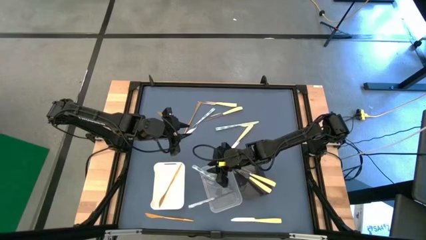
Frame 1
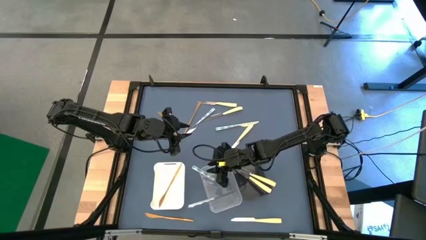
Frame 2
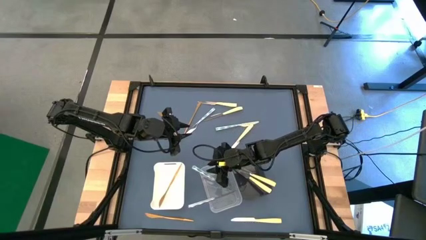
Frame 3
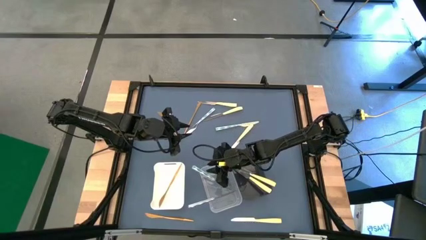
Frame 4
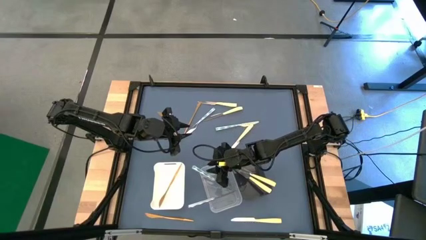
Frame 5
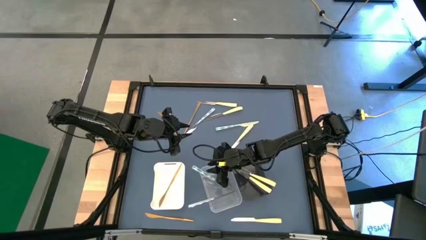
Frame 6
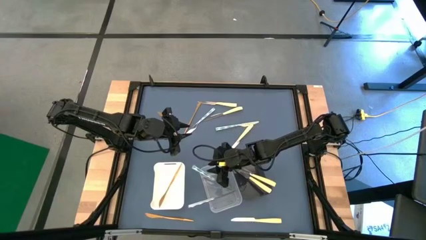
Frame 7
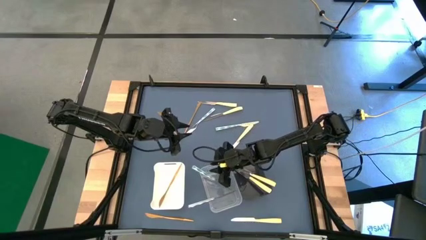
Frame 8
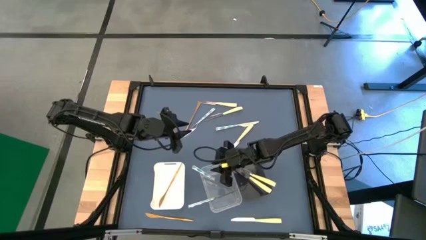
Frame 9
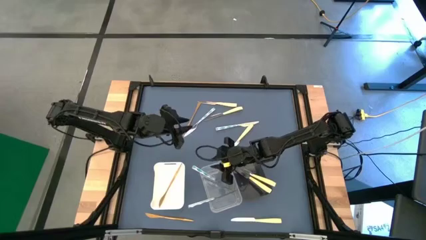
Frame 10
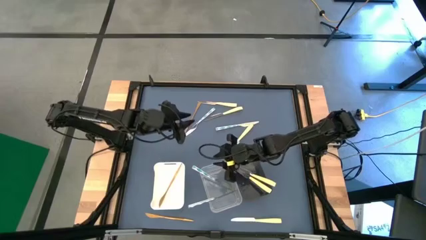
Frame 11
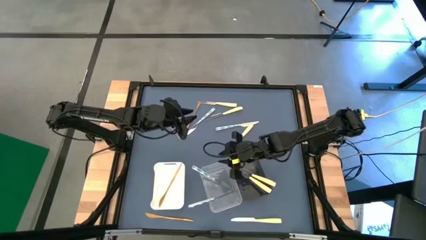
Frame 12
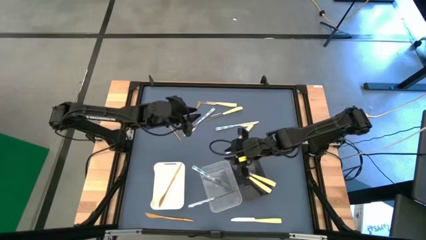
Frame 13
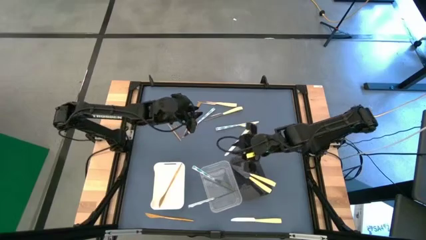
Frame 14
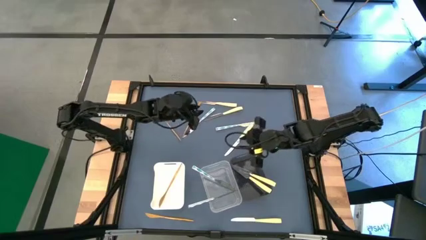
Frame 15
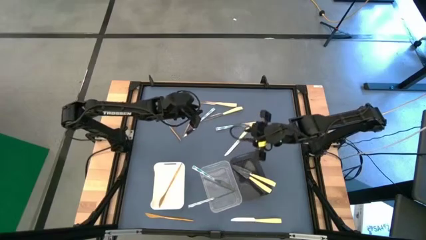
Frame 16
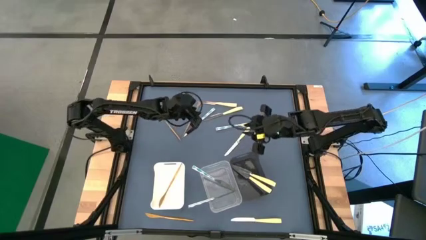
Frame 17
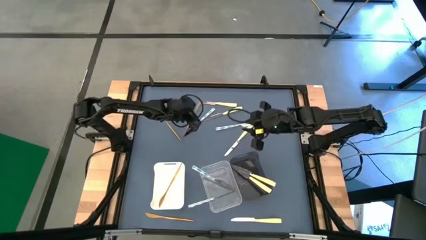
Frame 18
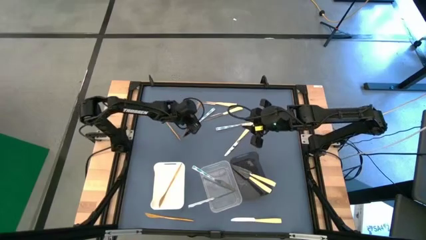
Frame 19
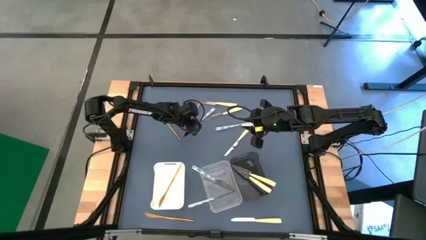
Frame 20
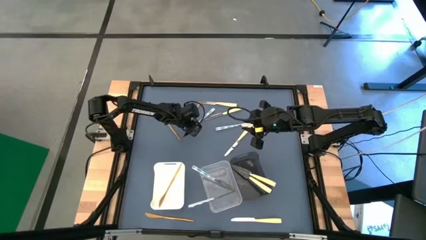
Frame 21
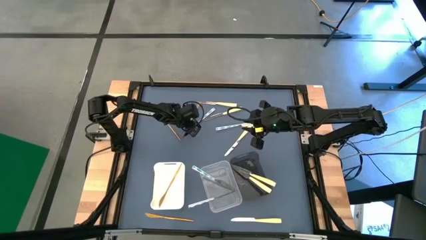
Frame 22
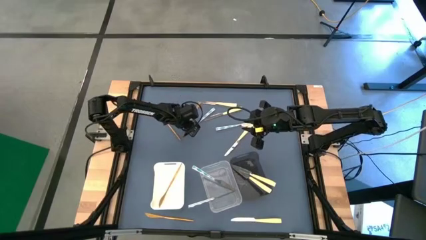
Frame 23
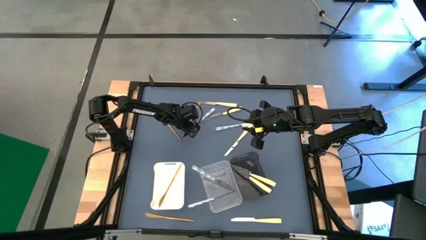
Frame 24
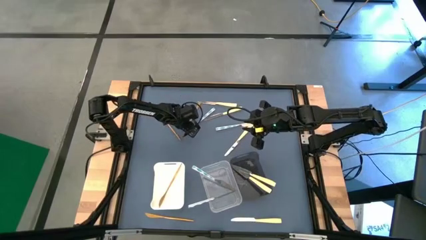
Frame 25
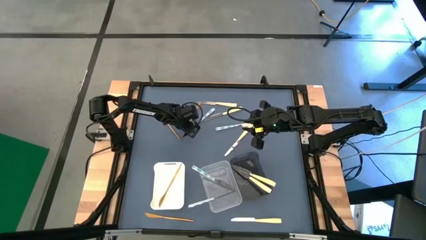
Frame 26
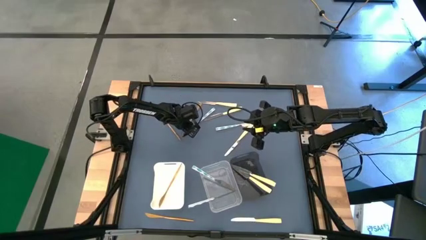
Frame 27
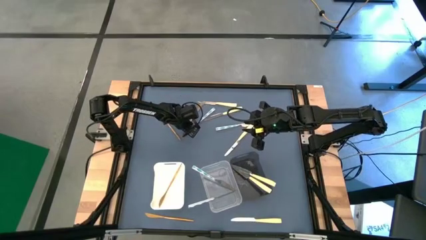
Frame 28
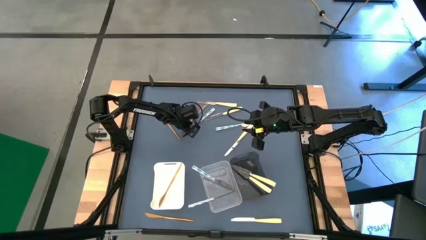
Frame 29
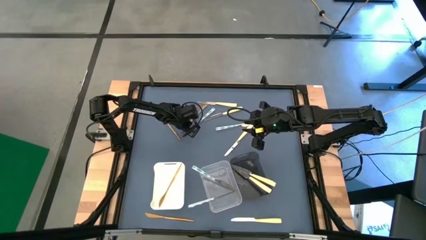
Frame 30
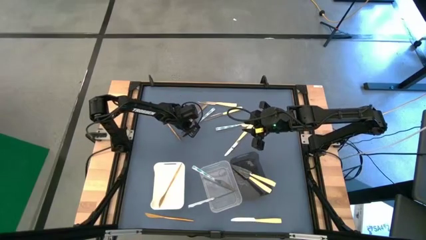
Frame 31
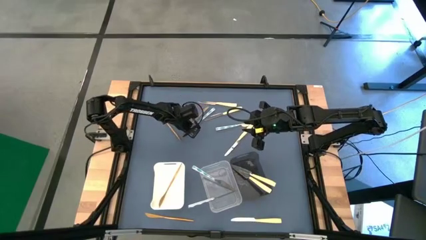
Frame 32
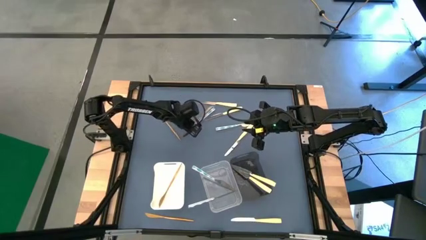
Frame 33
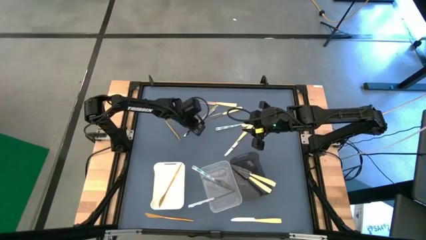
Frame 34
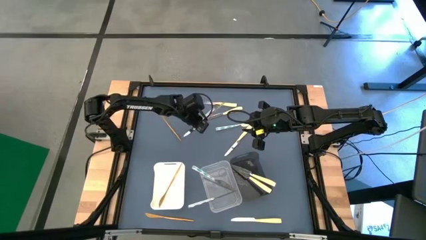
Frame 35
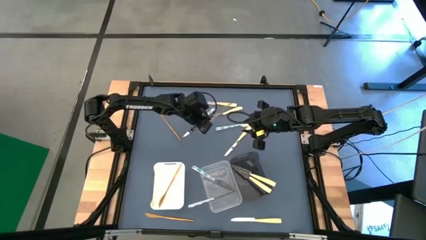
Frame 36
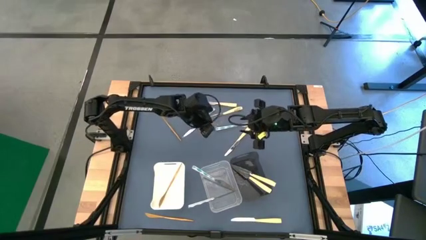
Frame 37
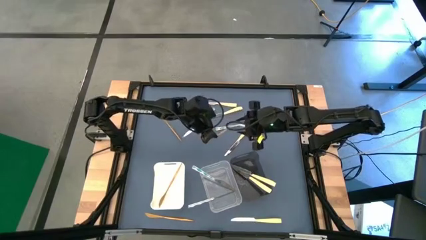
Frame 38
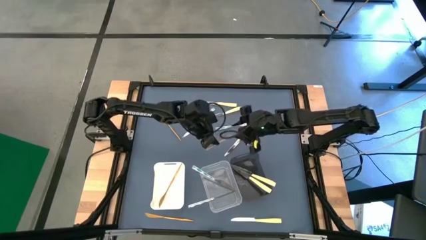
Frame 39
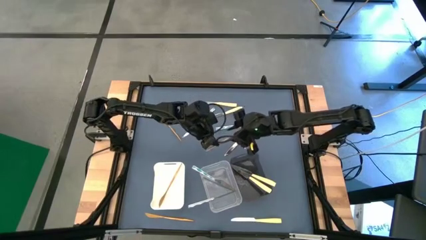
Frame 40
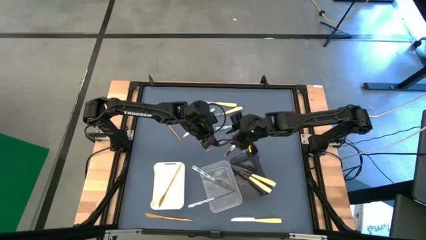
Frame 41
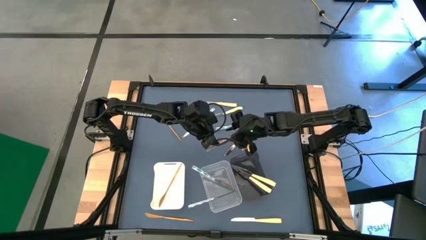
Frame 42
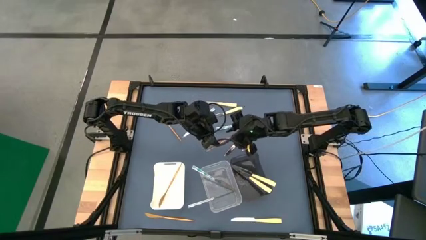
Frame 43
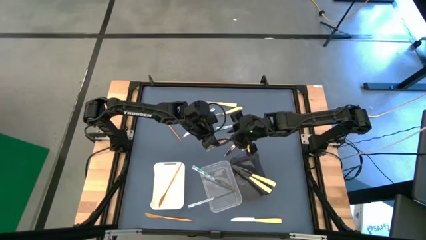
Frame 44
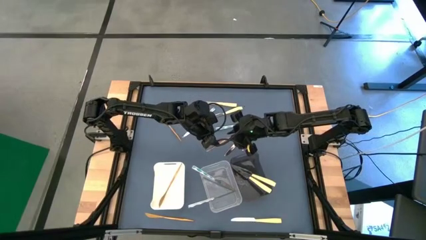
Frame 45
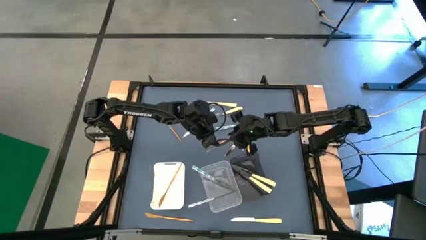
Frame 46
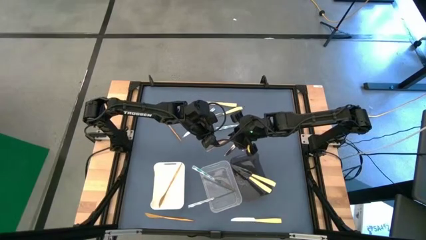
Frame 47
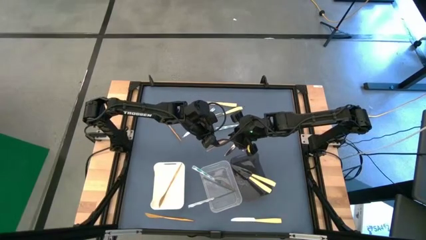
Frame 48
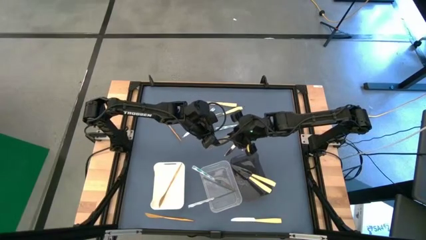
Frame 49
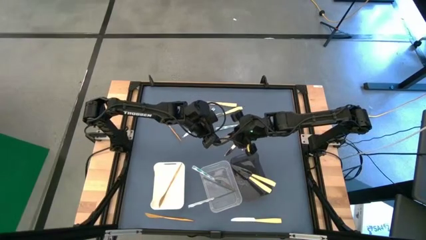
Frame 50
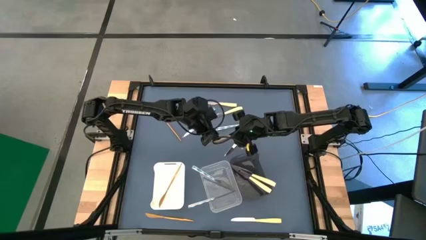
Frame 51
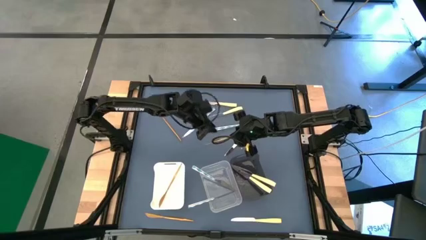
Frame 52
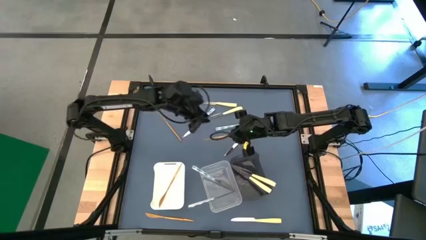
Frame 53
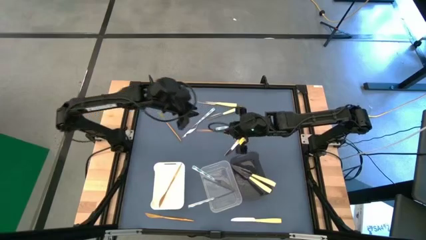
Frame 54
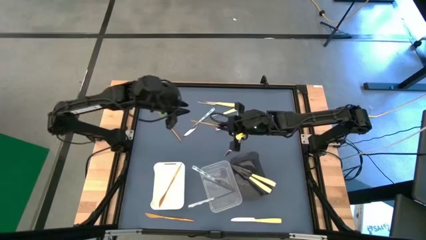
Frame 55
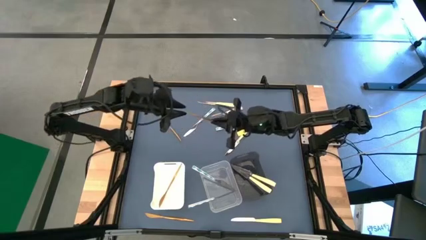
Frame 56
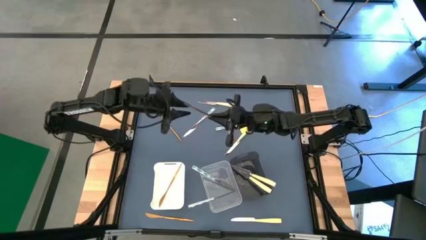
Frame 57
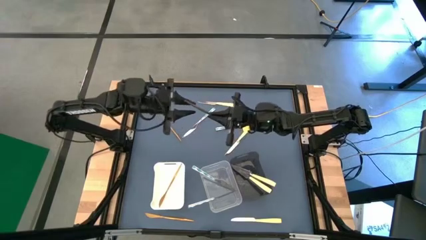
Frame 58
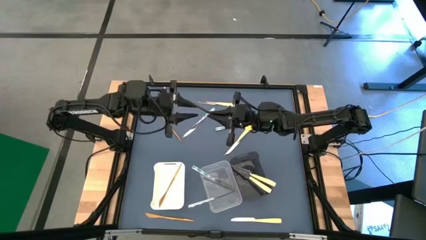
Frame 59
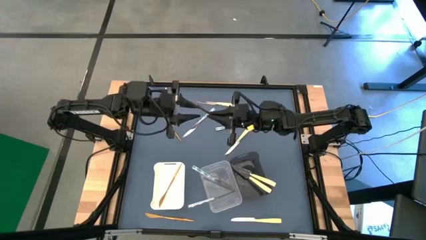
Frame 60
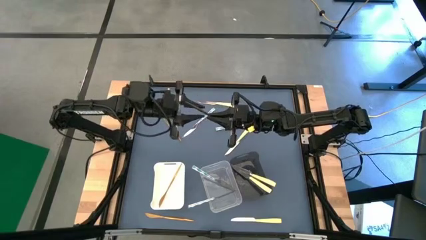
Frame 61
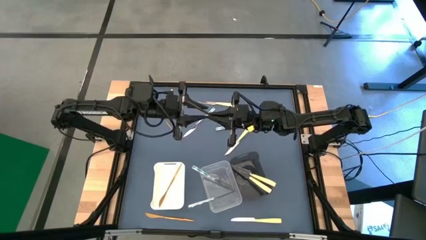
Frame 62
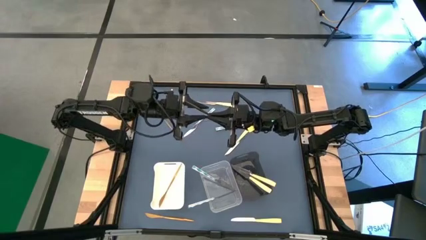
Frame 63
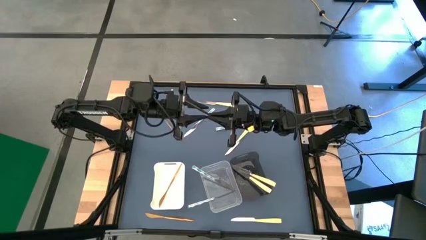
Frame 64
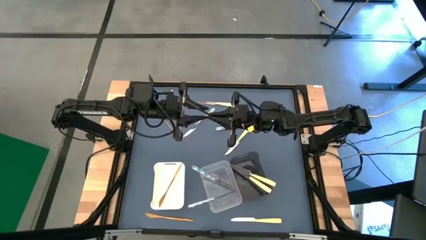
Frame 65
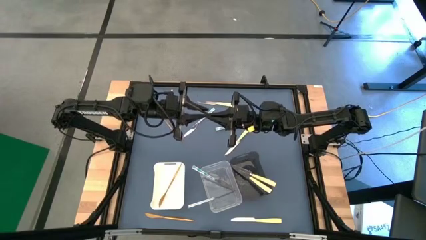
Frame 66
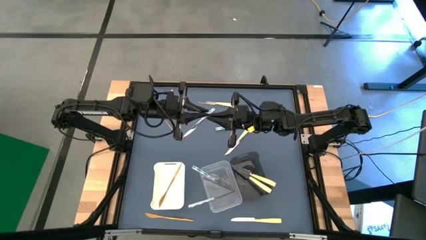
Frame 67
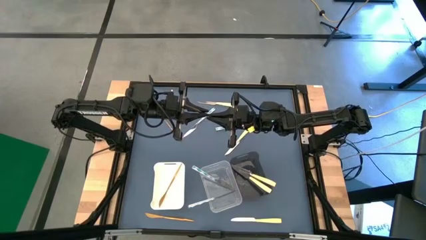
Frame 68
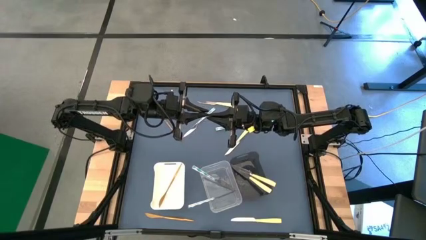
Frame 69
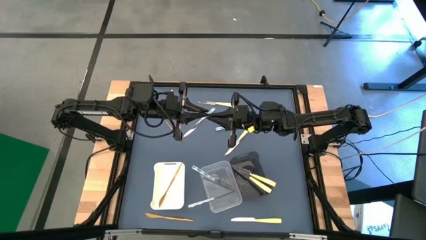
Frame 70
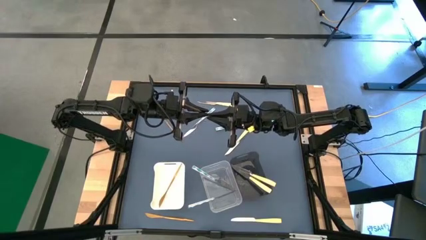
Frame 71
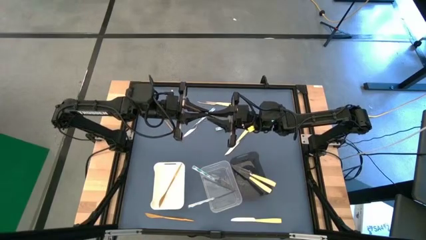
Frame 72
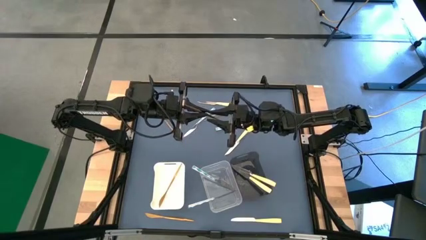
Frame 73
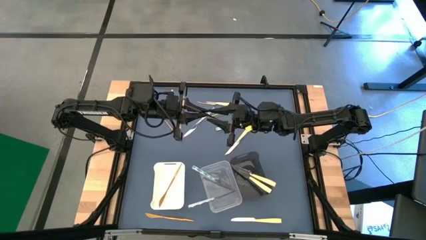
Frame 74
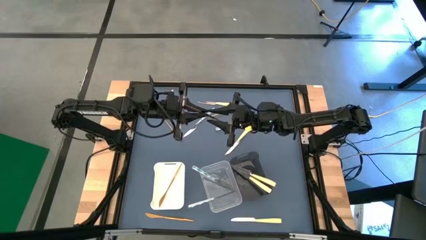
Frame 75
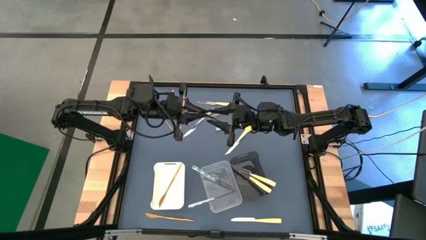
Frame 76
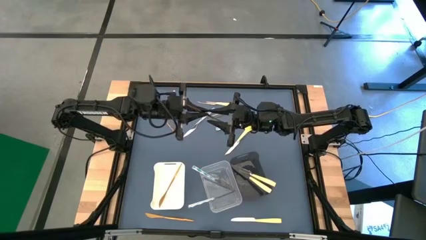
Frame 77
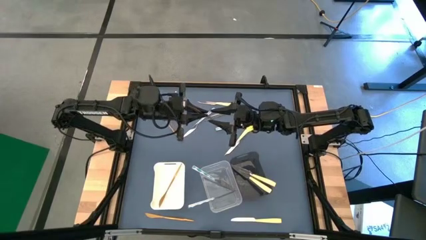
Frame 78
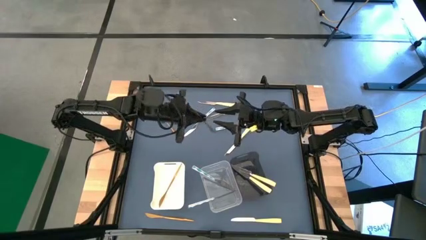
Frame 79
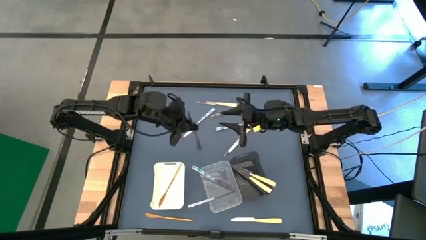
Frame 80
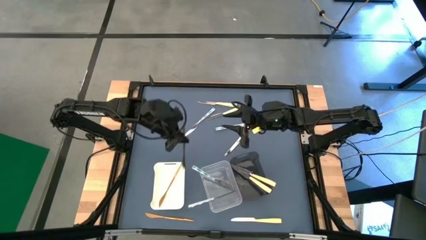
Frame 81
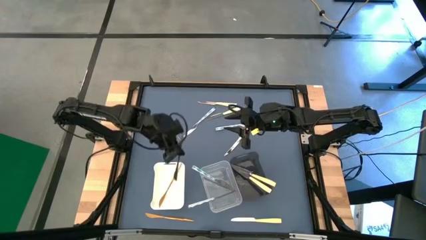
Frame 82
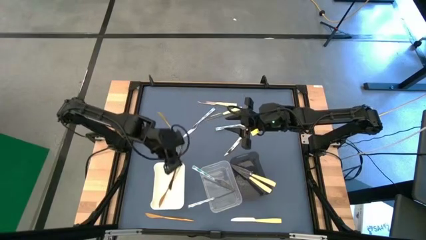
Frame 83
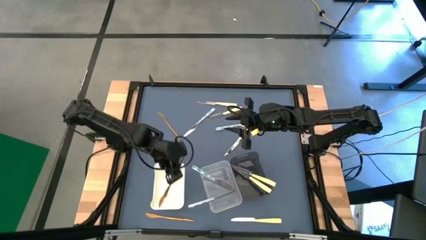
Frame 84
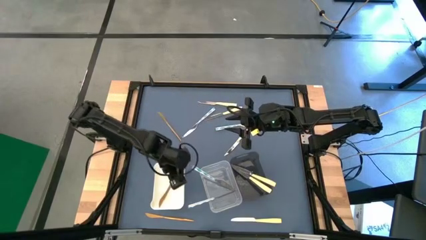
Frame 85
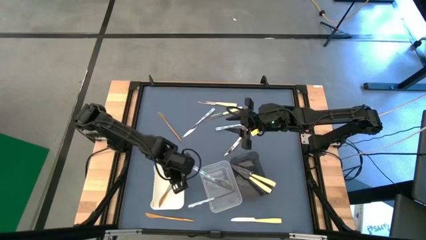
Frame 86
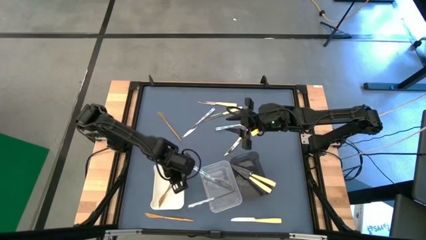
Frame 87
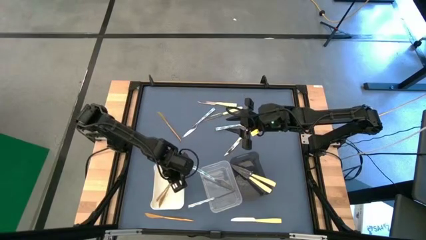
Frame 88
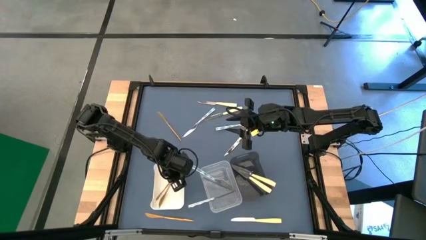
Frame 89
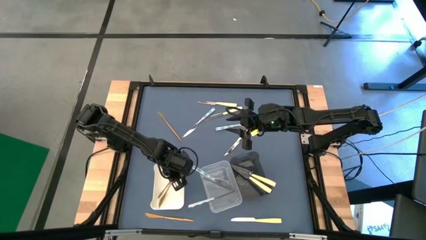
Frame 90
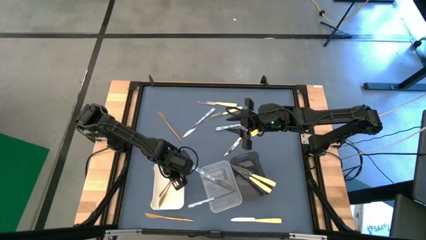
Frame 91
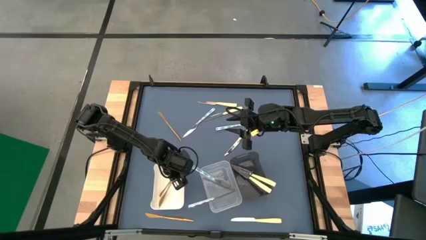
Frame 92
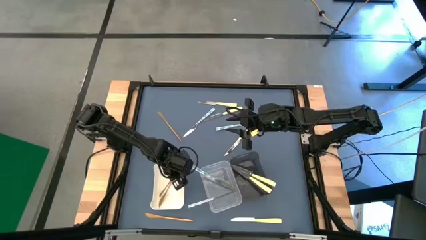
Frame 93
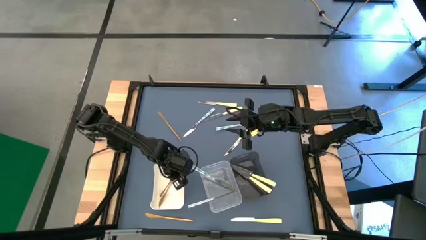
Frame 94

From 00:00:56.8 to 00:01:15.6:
Task: Sort silverware by color (type)
Put the gold table knife into the white bin
